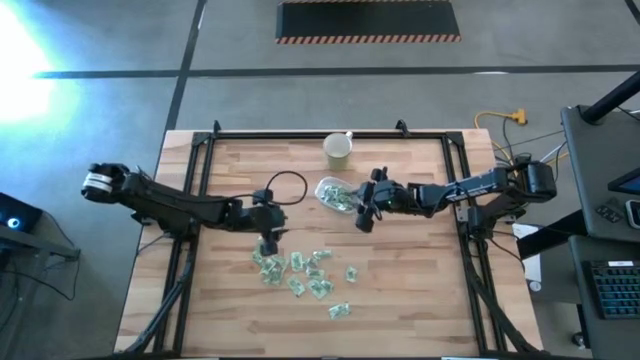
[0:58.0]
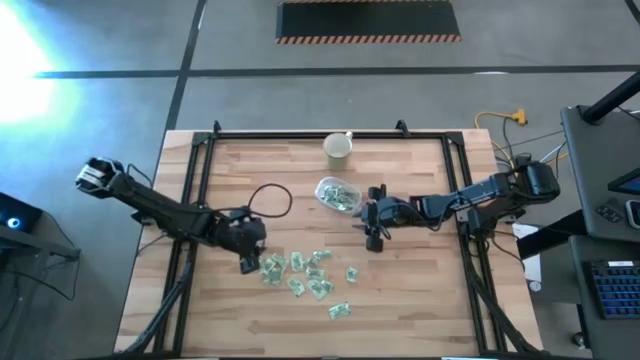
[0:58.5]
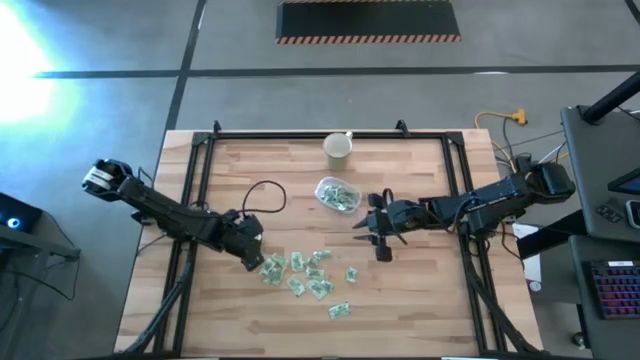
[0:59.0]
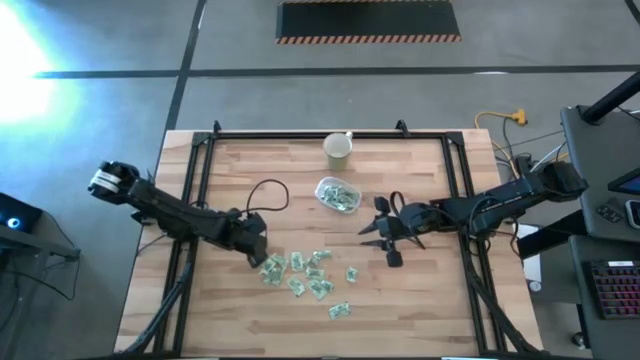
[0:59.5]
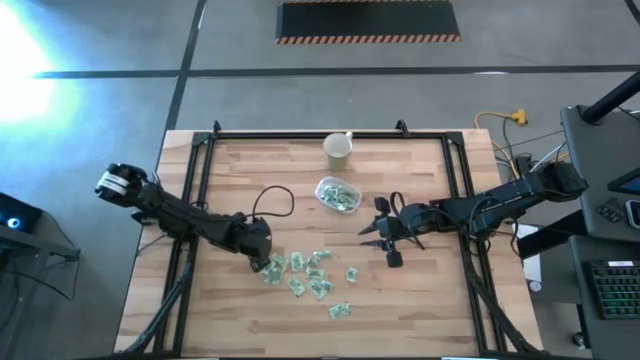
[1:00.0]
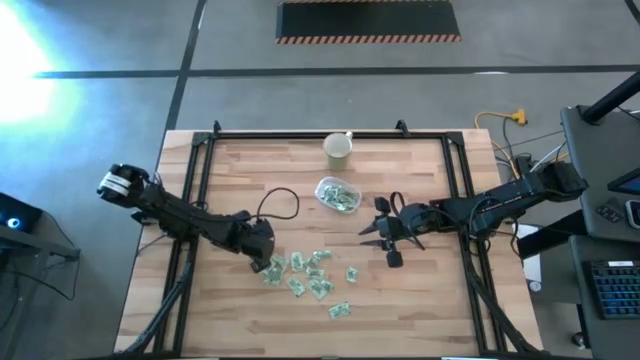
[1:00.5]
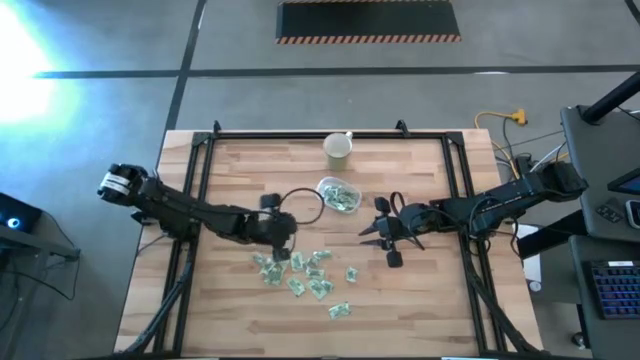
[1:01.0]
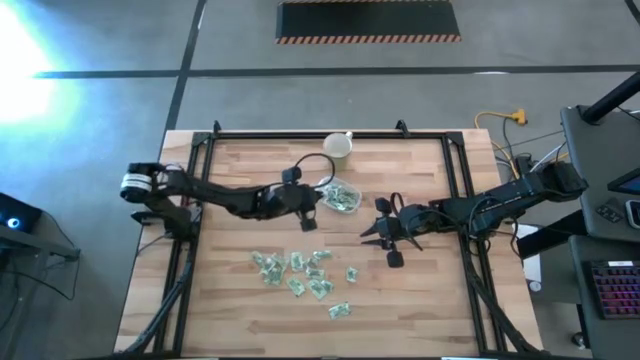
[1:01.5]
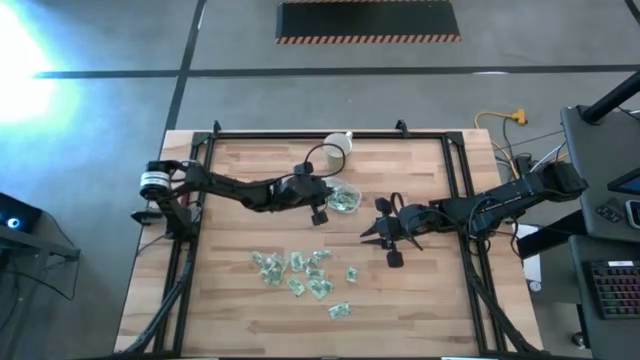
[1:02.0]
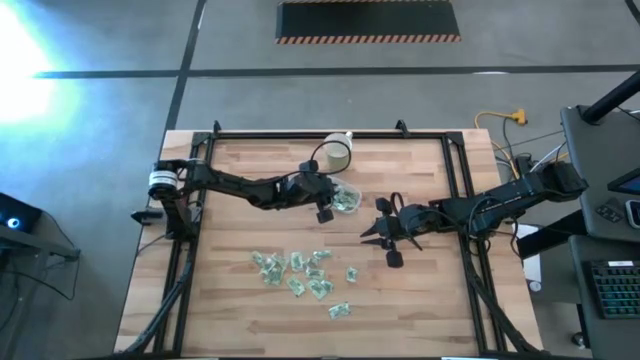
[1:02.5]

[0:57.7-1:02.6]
Task: Pick and place items into bin
Put the green stevia packet into the transparent bin

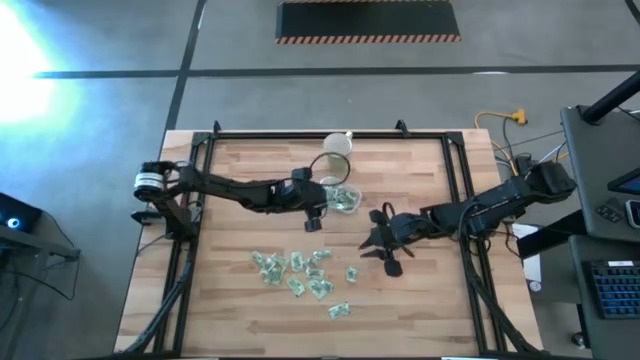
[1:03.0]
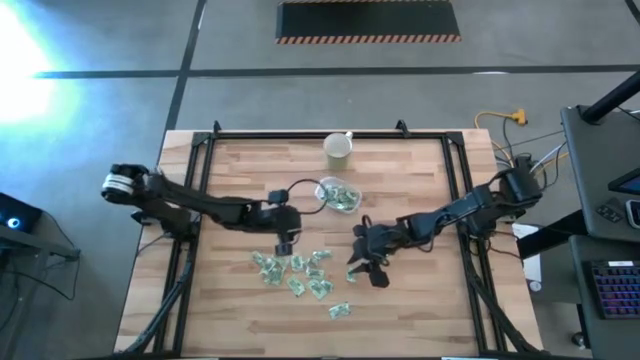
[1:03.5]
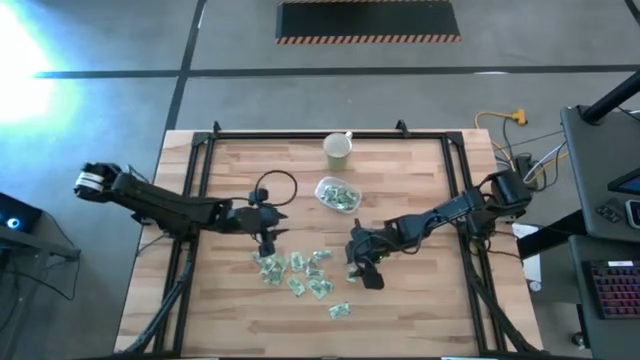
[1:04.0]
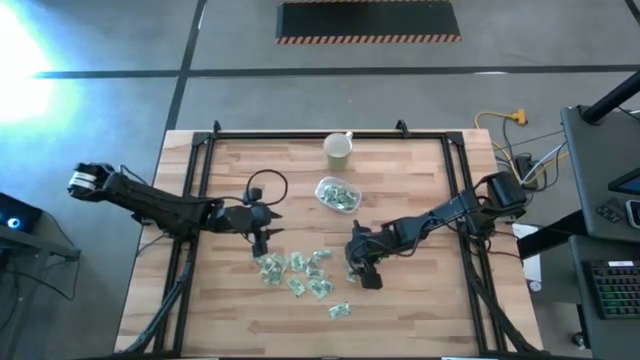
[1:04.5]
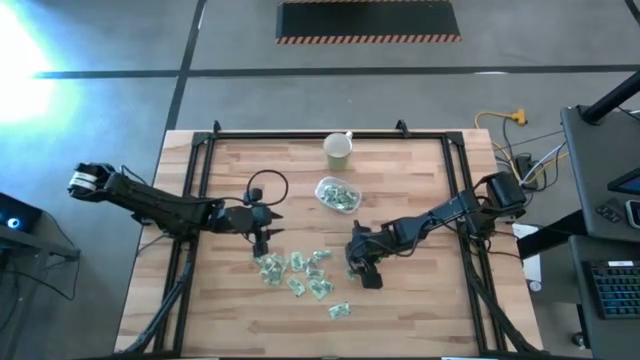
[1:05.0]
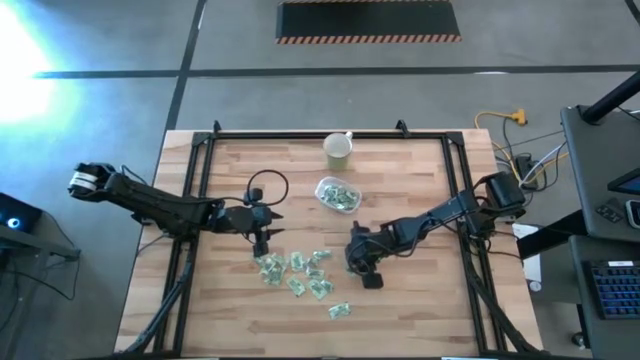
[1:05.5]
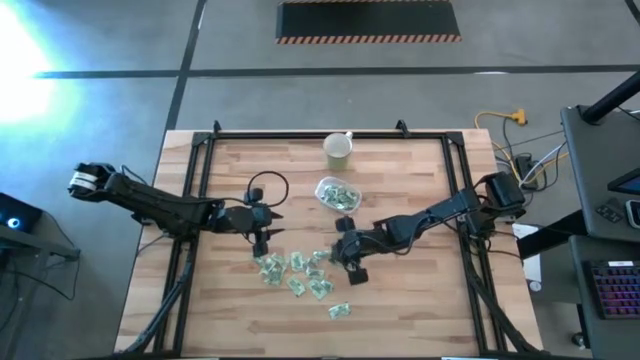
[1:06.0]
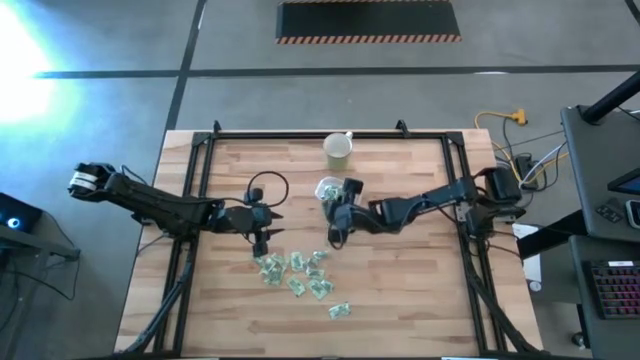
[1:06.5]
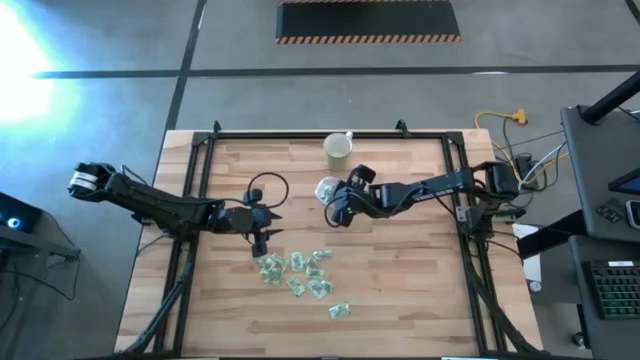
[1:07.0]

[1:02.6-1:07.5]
Put the green stevia packet into the transparent bin

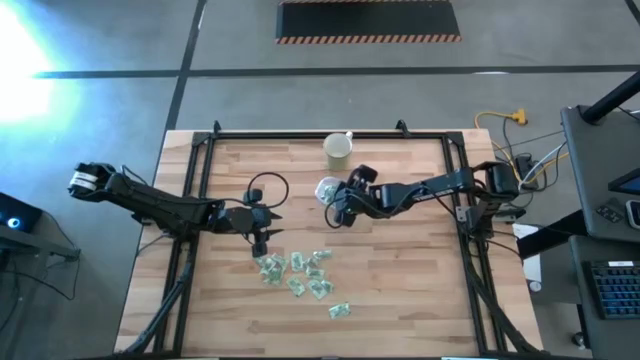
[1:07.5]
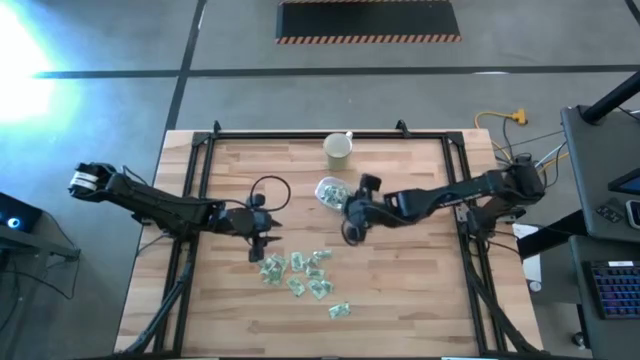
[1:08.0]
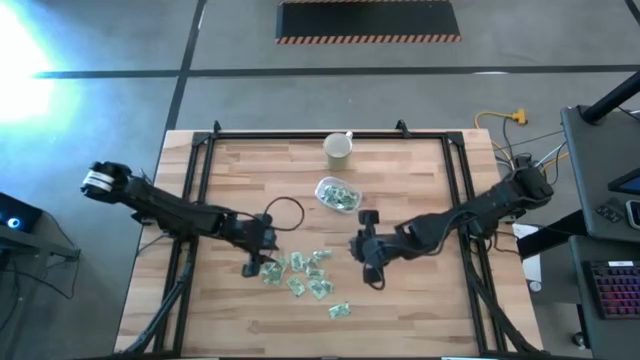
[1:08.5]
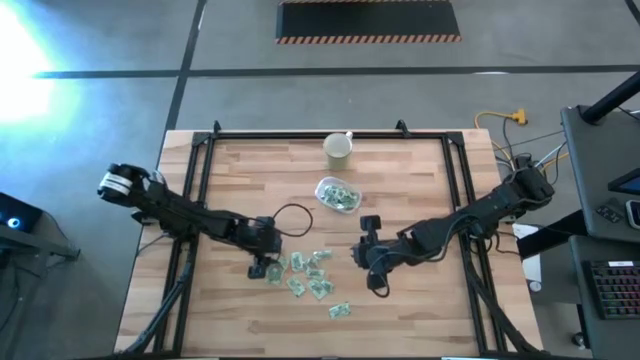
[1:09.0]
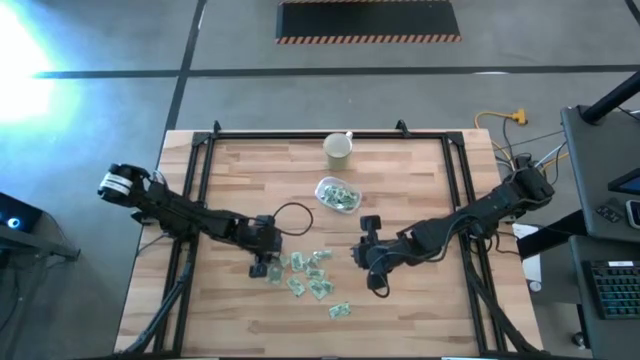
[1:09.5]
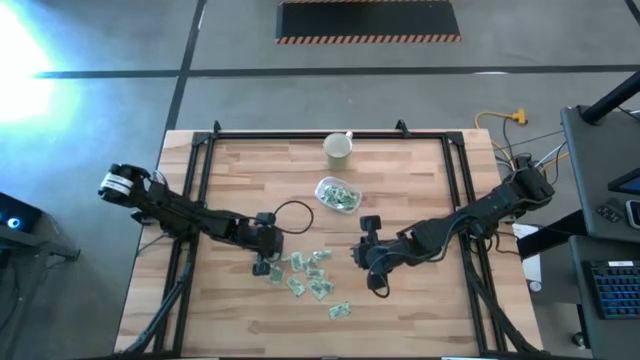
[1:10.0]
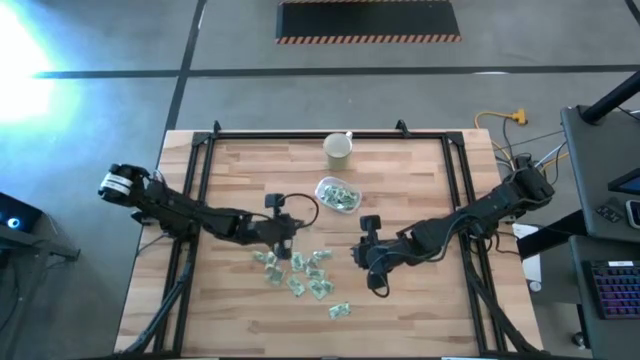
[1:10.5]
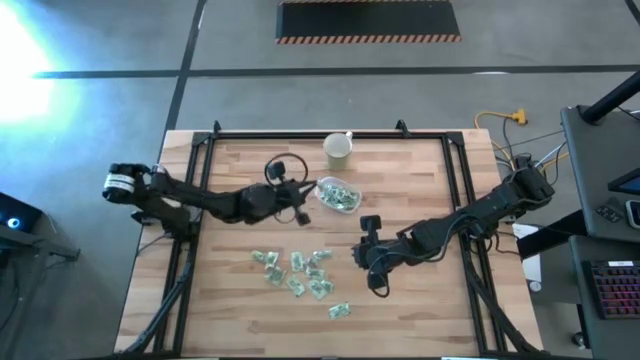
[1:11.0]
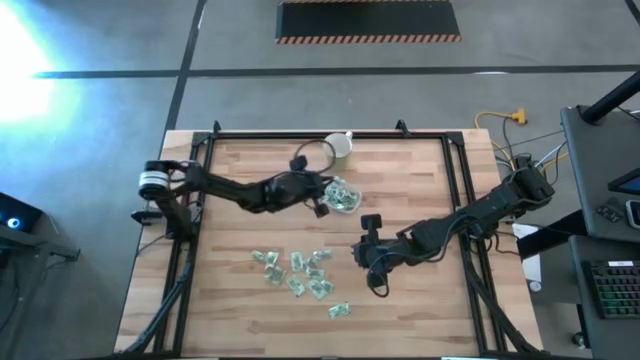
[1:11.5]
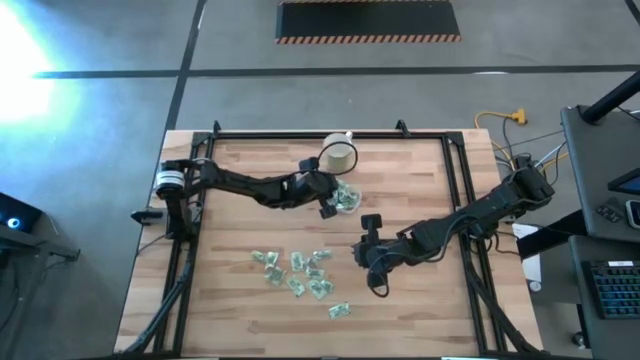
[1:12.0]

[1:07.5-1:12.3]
Put the green stevia packet into the transparent bin

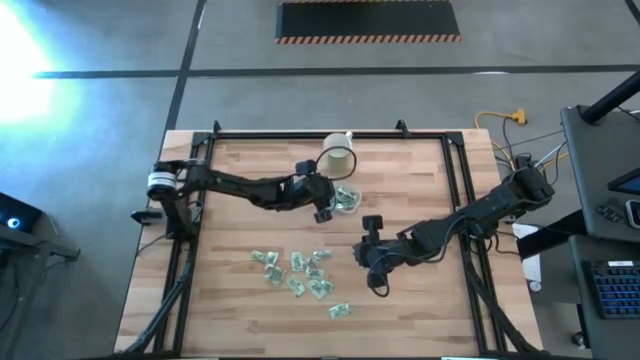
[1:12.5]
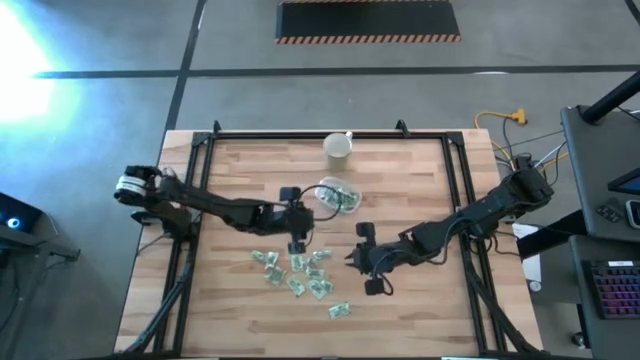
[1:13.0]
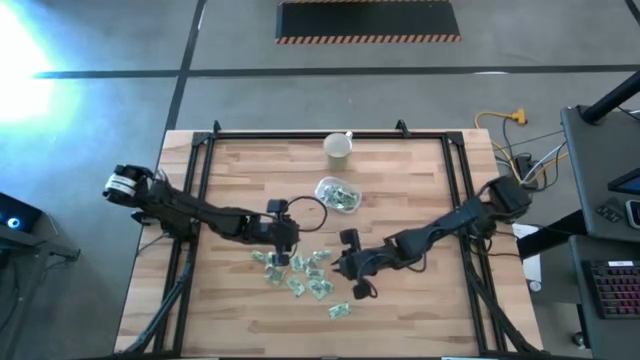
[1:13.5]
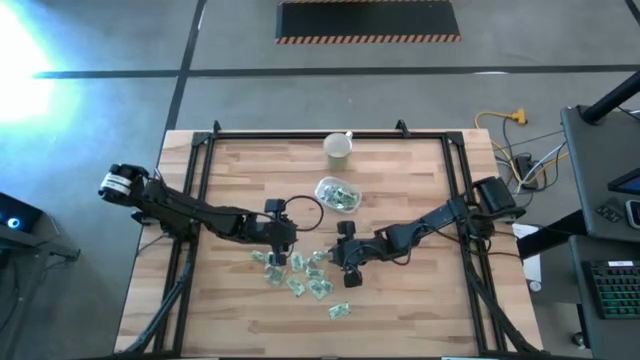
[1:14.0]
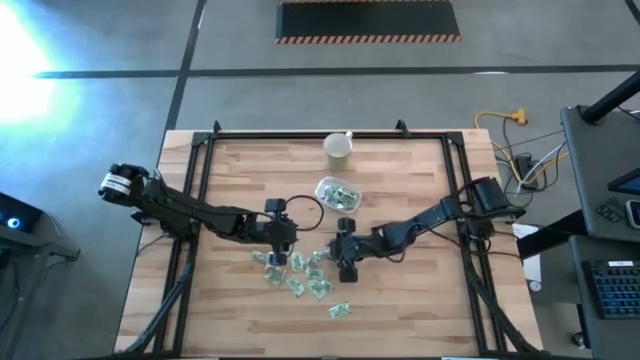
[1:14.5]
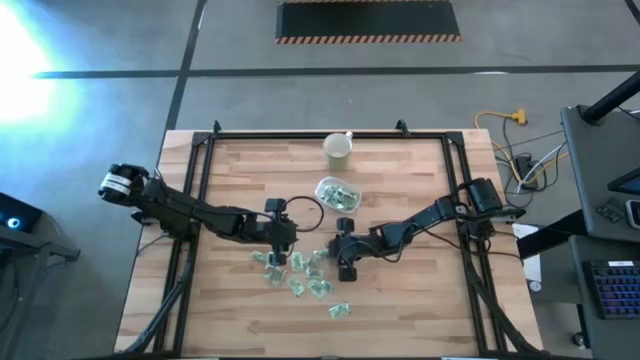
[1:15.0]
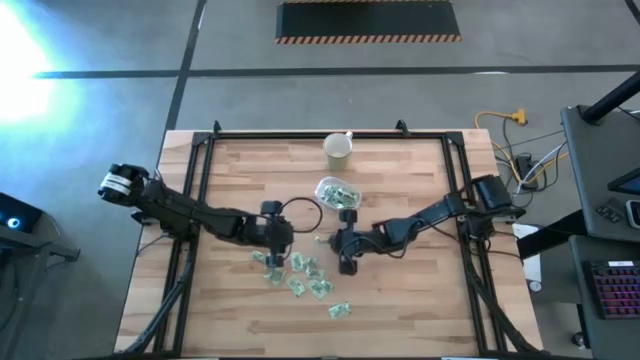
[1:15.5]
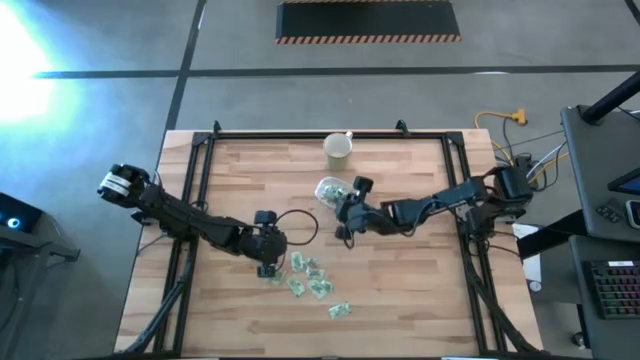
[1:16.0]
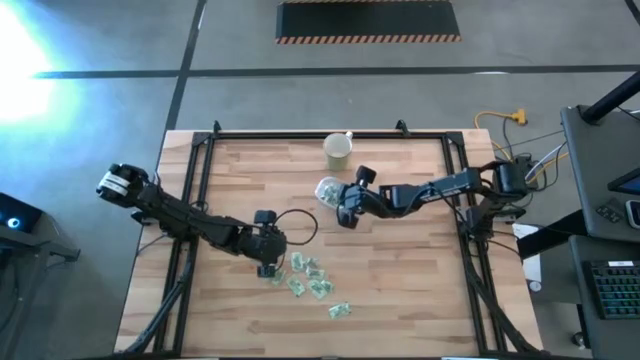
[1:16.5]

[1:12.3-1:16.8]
Put the green stevia packet into the transparent bin

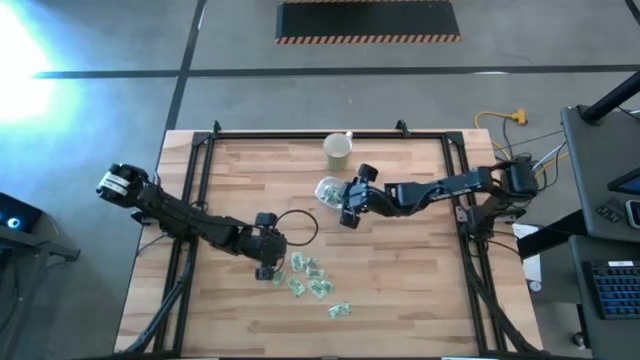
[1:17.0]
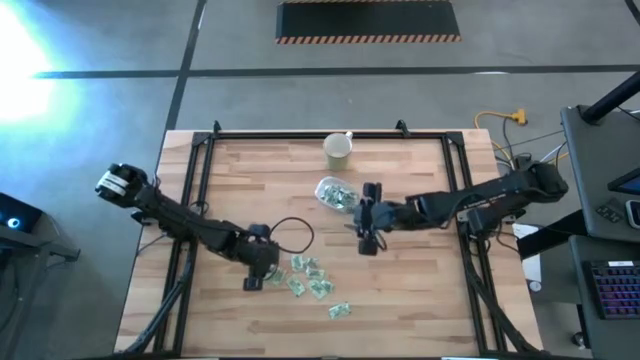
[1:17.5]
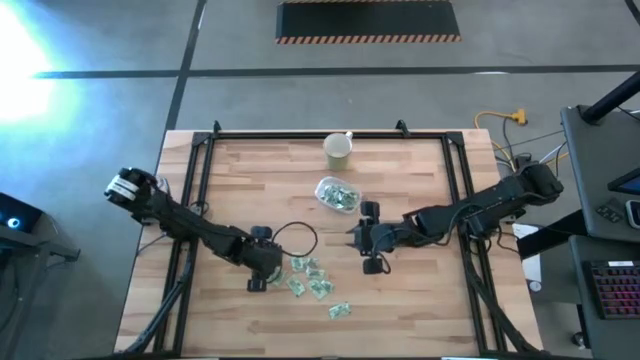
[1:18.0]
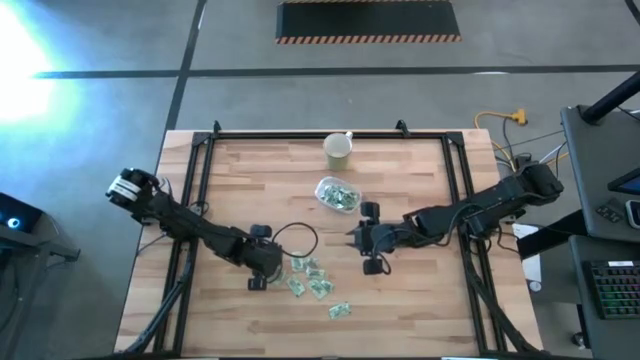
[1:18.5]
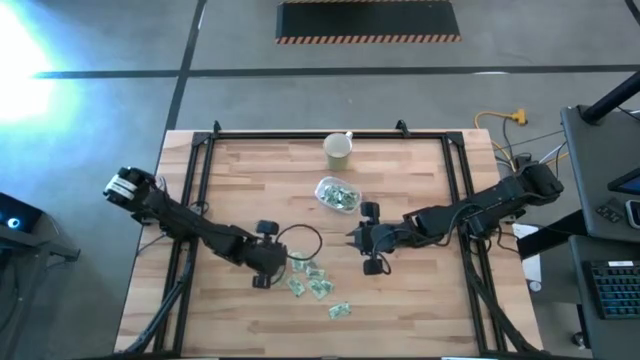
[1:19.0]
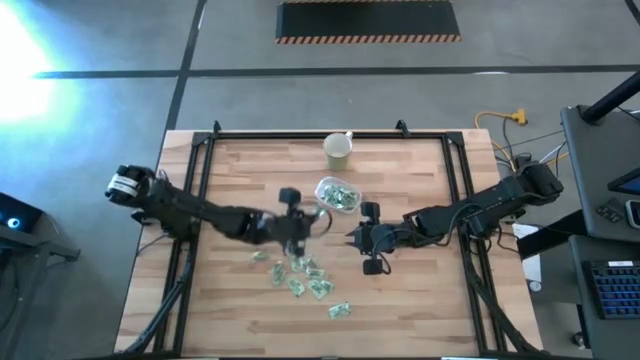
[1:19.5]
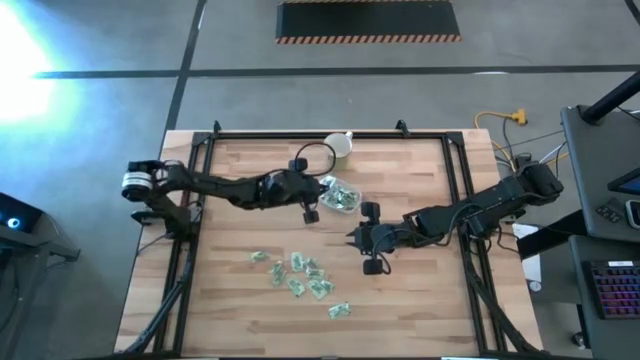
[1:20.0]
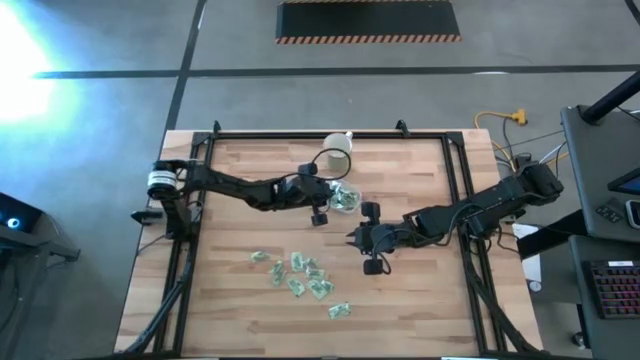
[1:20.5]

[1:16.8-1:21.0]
Put the green stevia packet into the transparent bin
